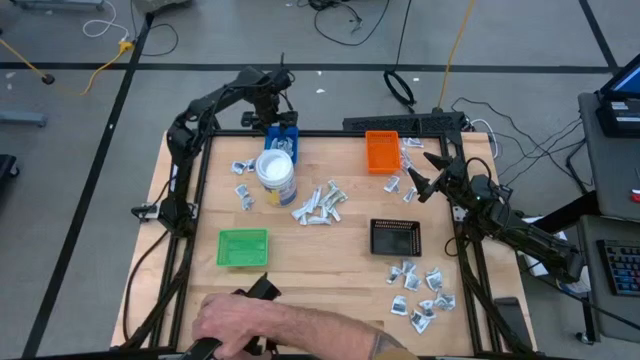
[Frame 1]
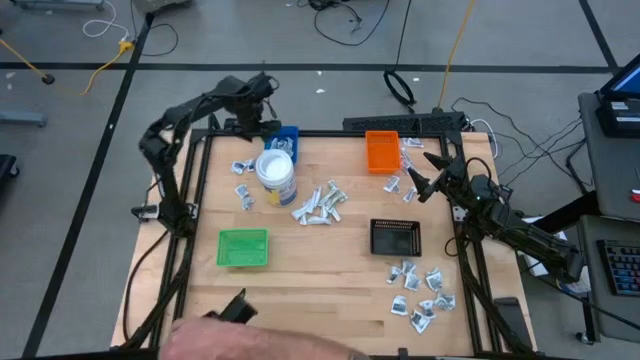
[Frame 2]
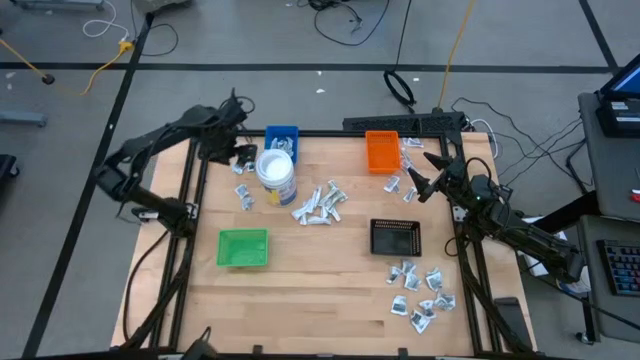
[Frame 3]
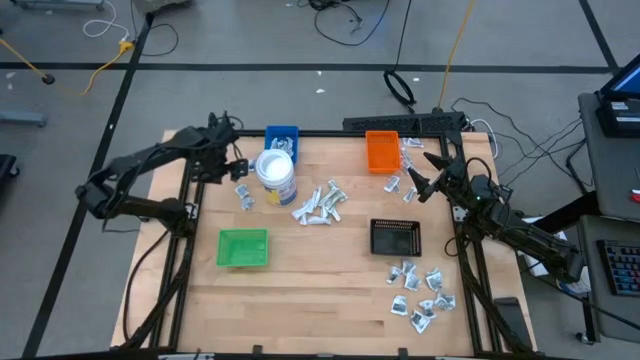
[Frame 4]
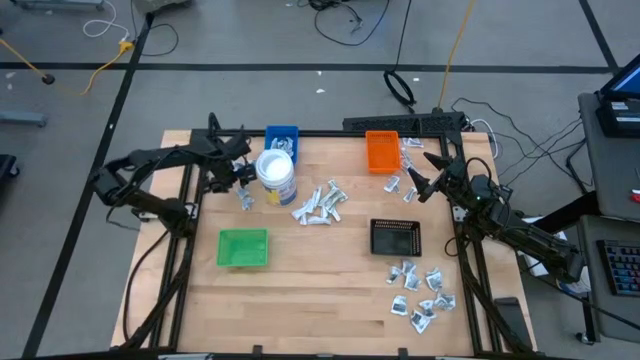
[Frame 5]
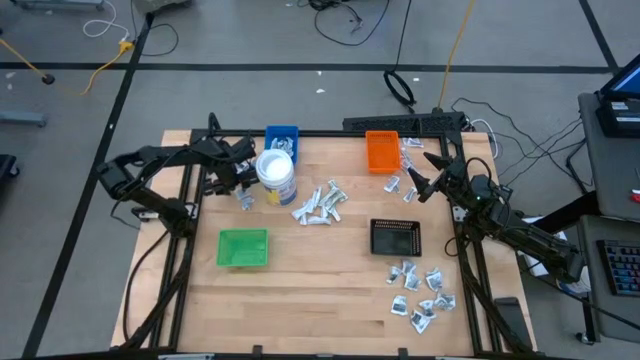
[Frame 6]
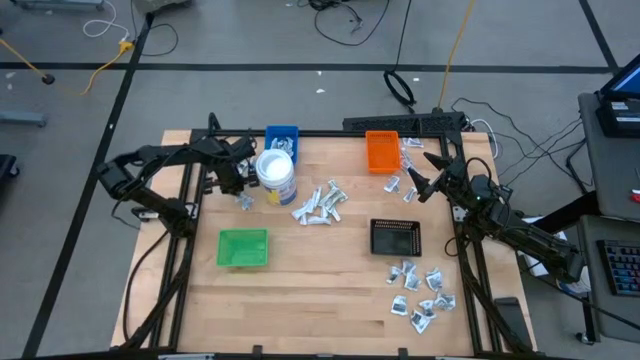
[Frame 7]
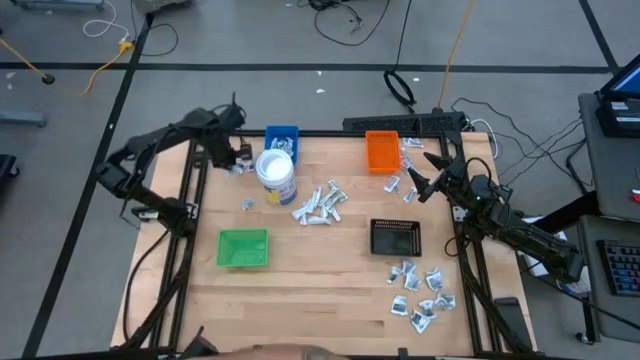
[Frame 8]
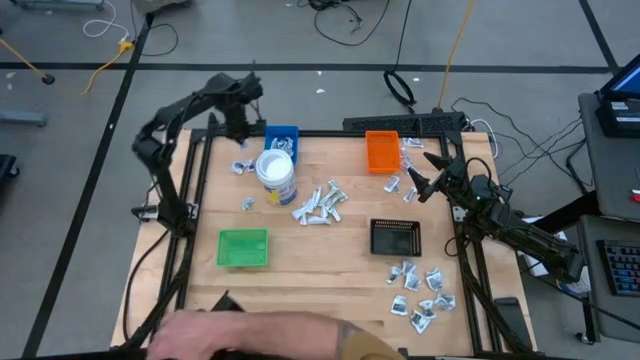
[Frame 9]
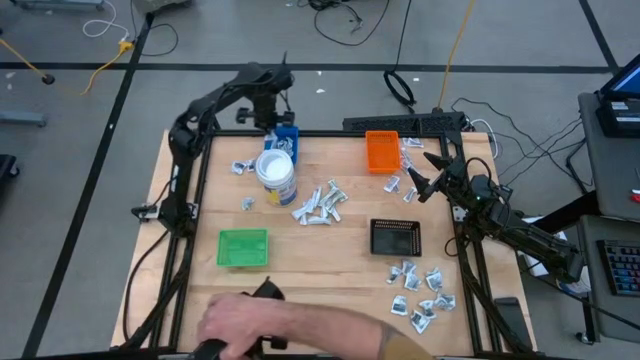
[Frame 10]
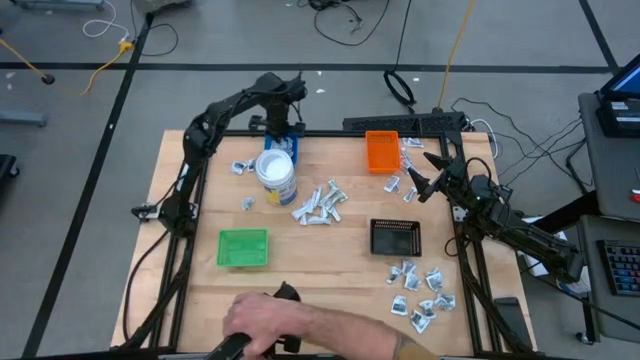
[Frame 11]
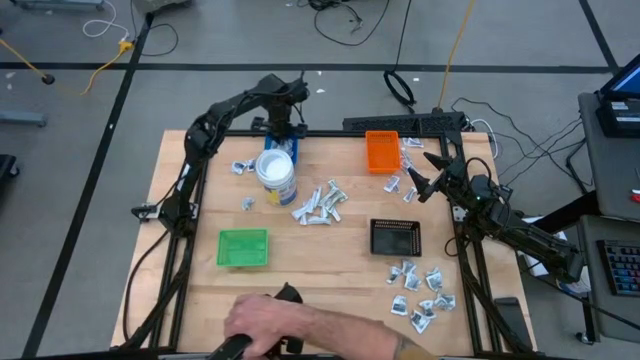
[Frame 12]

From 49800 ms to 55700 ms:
Task: Pick & Place First Aid Supplies
Put the blue alcohol pad into the blue bin

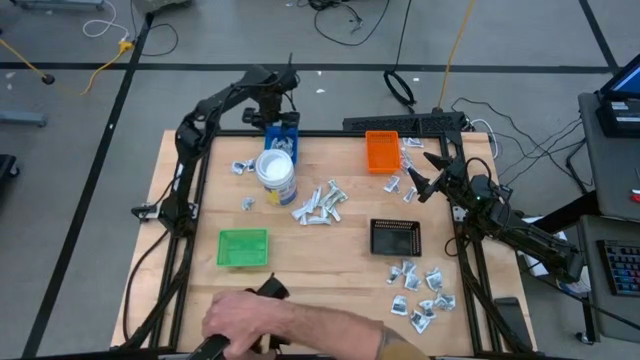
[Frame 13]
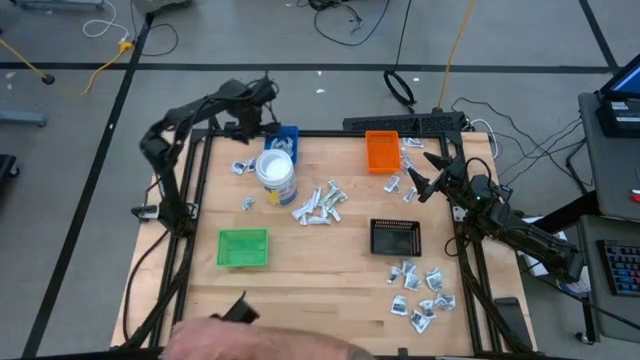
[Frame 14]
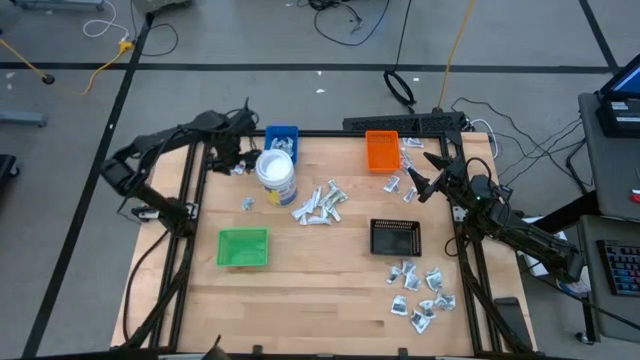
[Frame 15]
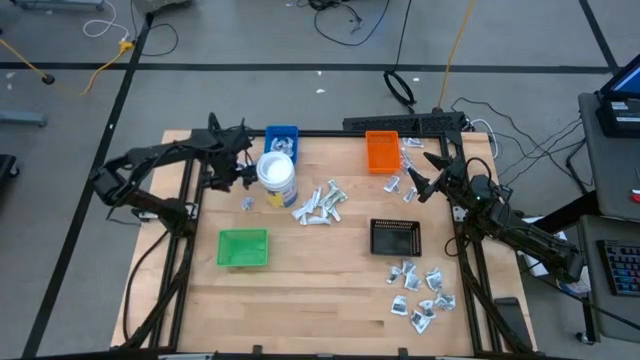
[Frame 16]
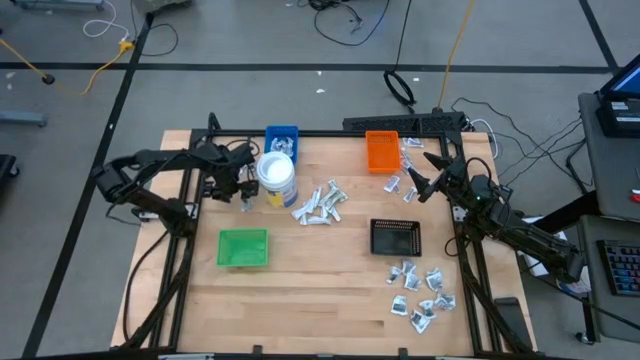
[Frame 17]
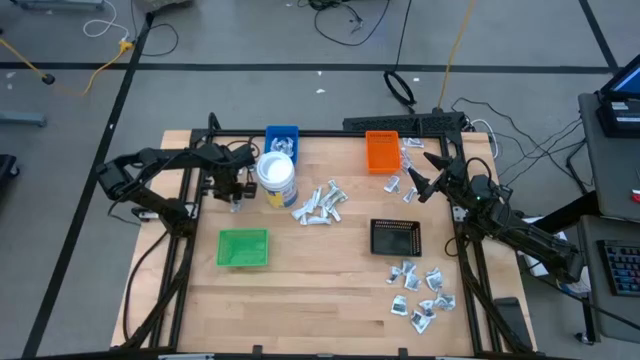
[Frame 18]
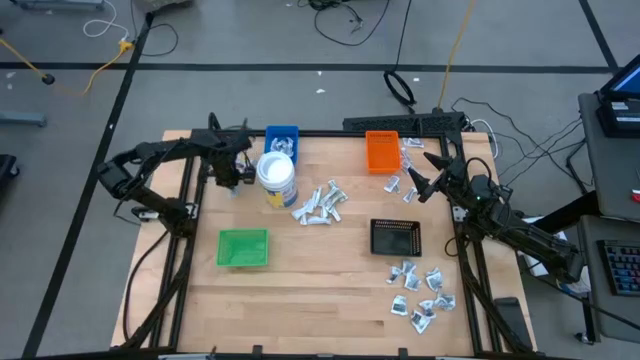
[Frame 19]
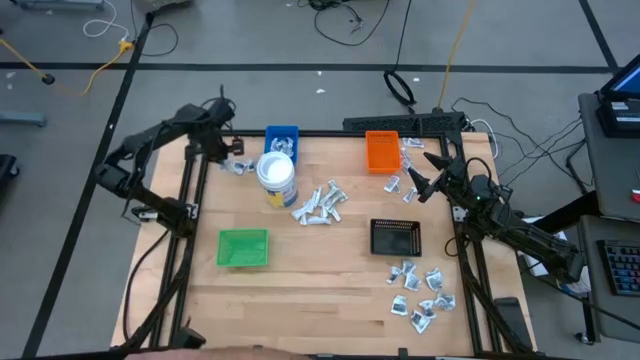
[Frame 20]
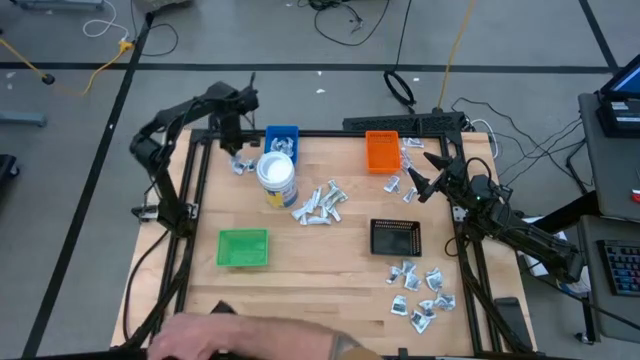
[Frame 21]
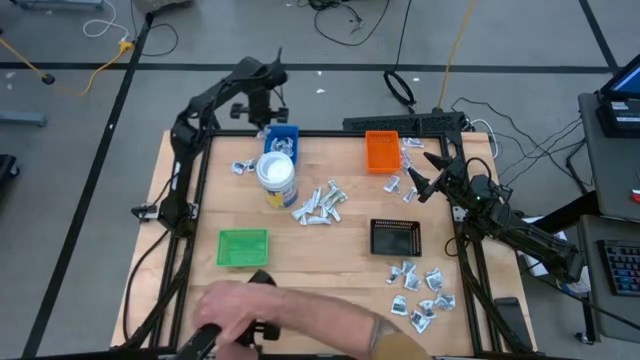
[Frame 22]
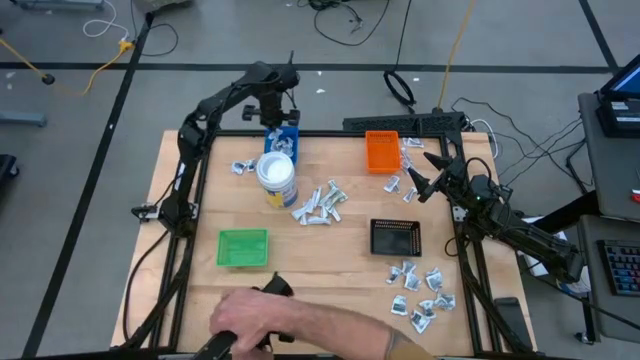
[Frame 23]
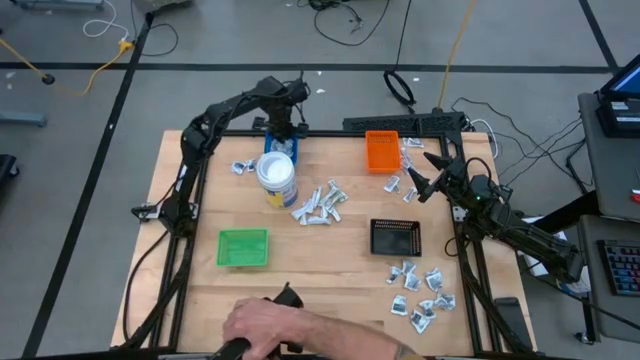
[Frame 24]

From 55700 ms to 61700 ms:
Put the blue alcohol pad into the blue bin

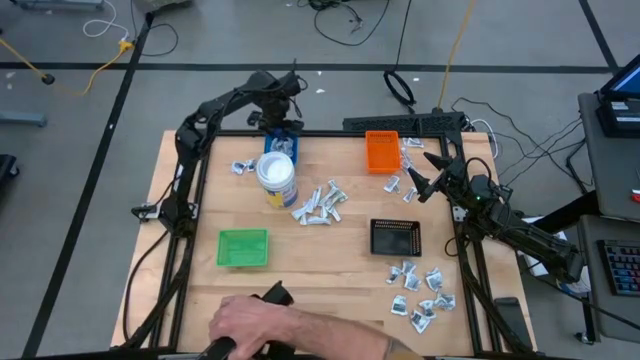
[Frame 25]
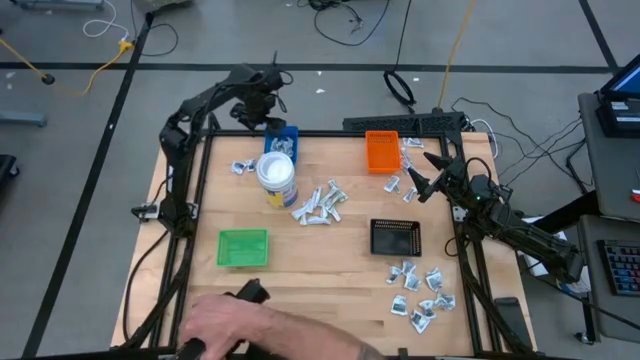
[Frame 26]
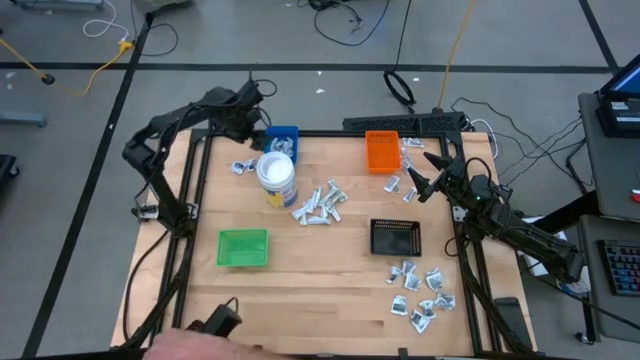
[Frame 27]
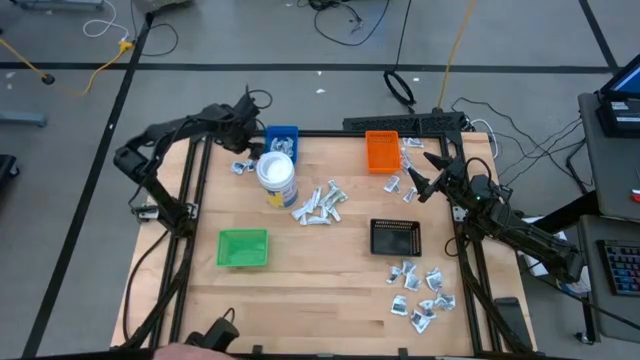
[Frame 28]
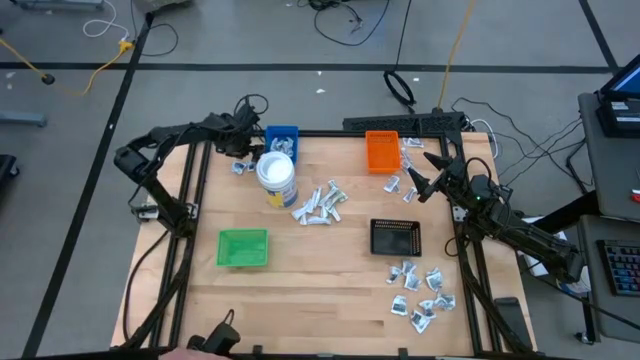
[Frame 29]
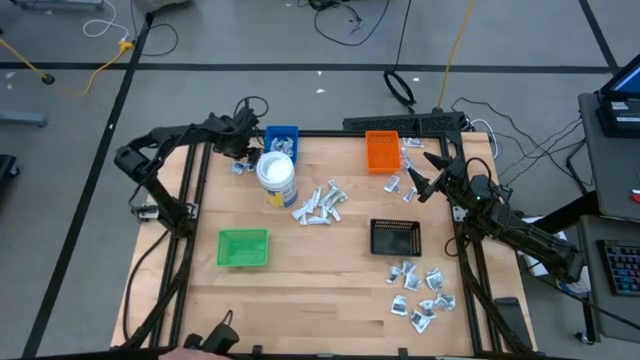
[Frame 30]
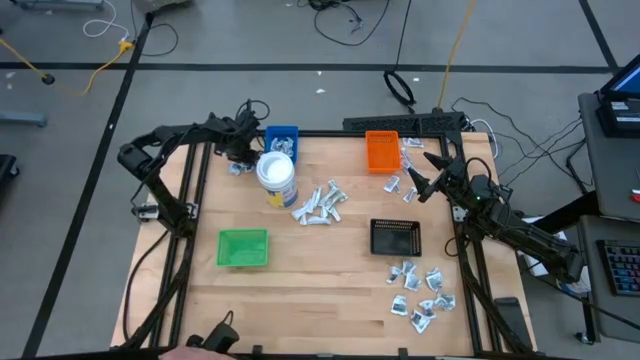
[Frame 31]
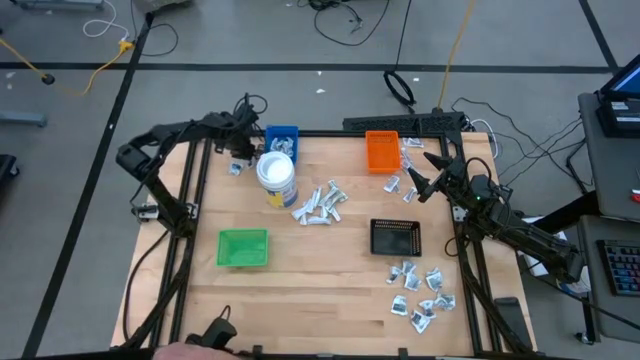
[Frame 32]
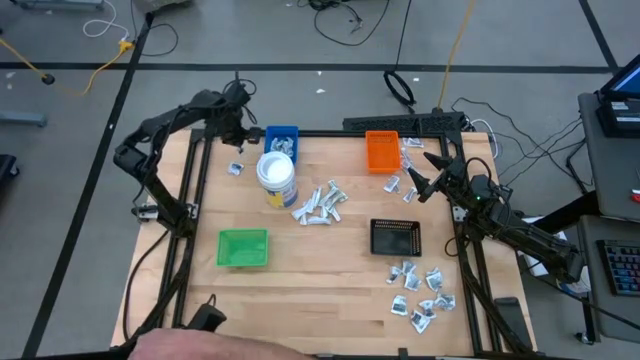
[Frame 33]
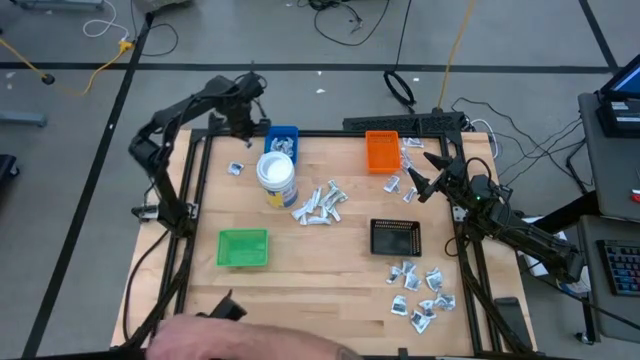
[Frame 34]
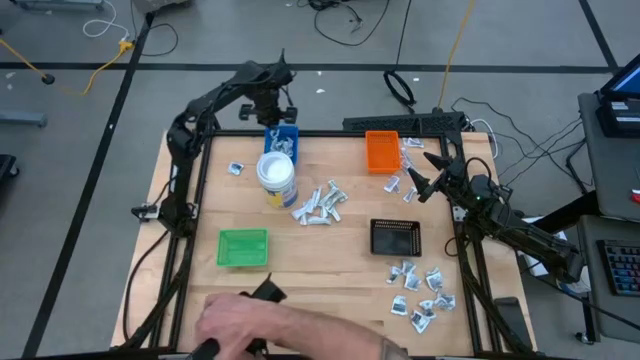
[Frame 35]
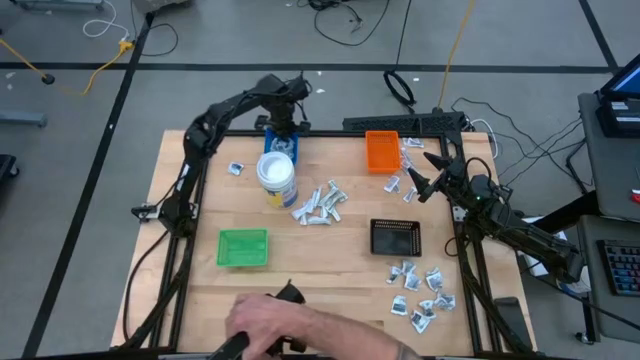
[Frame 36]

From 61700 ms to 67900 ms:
Put the blue alcohol pad into the blue bin

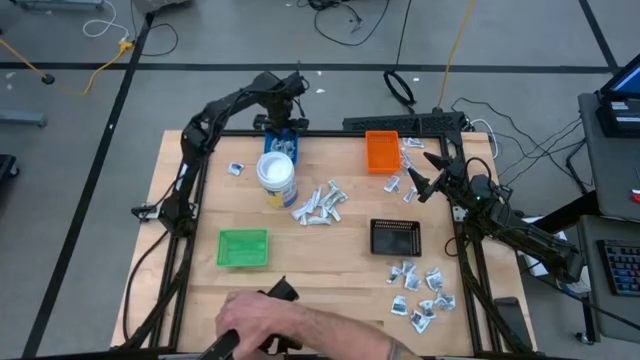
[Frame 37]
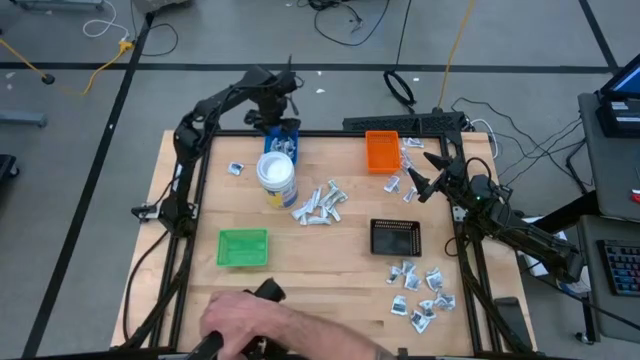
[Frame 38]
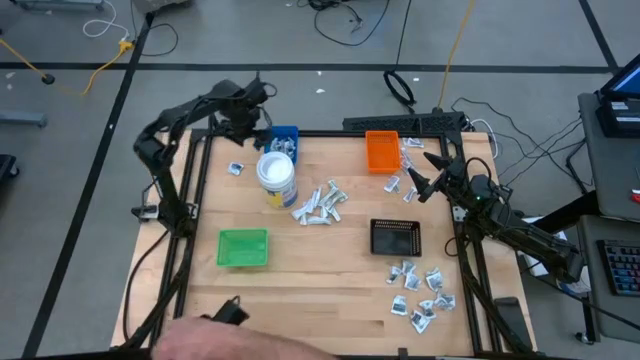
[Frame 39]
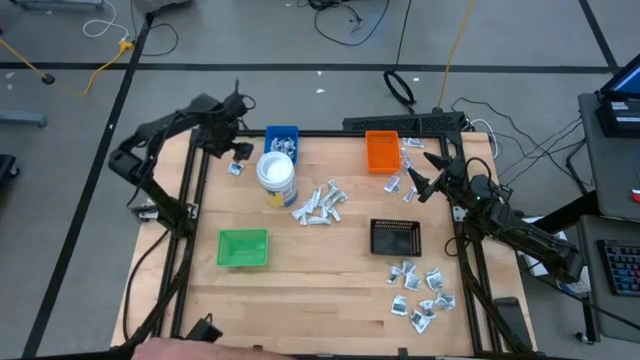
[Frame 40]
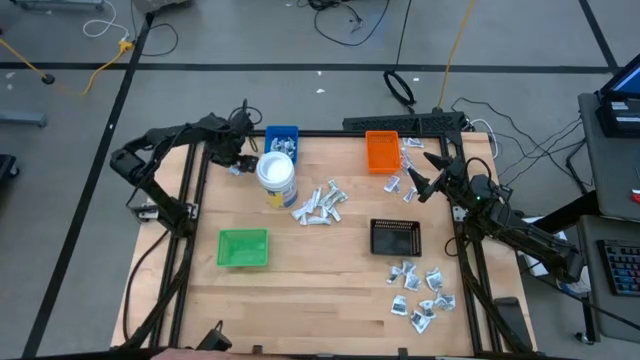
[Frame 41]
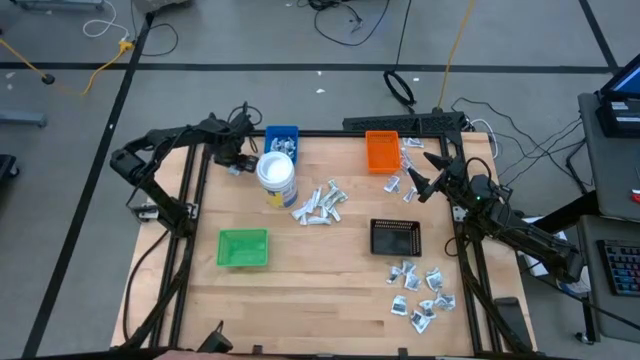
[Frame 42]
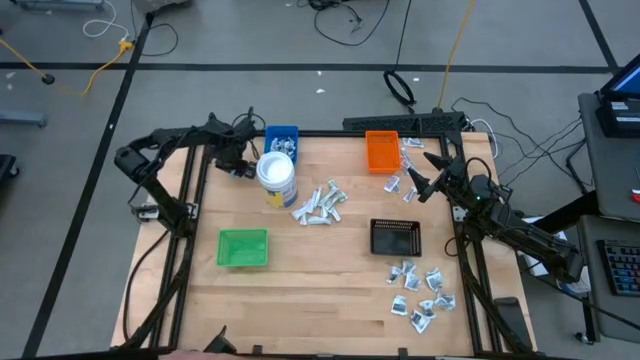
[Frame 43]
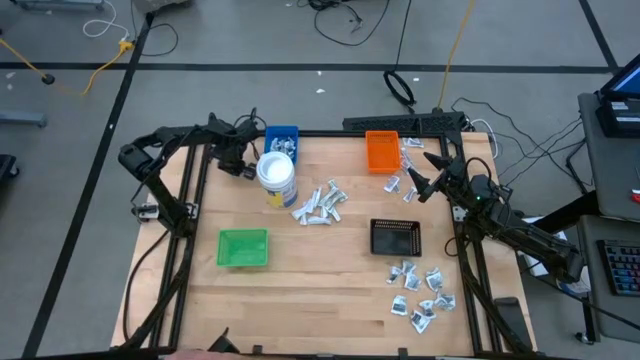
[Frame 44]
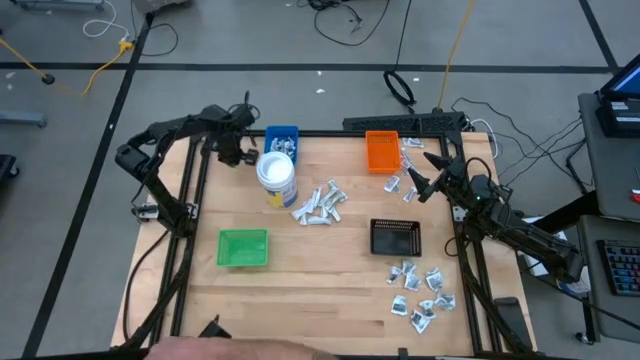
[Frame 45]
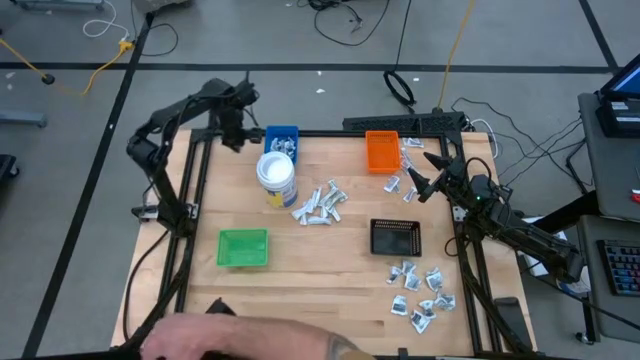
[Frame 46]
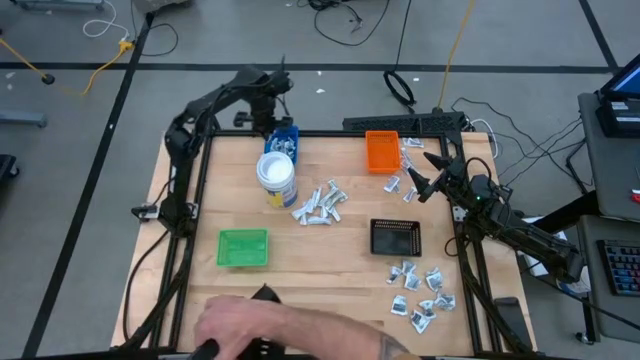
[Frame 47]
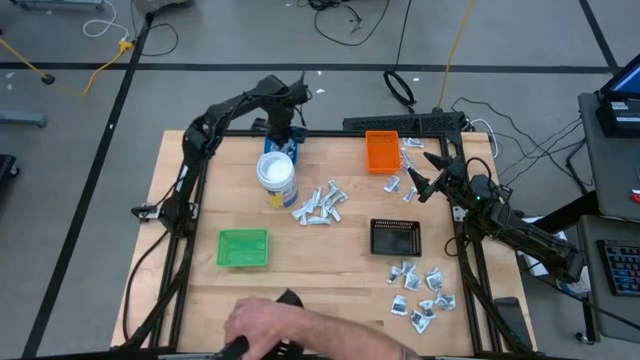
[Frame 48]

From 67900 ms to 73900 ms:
Put the blue alcohol pad into the blue bin
